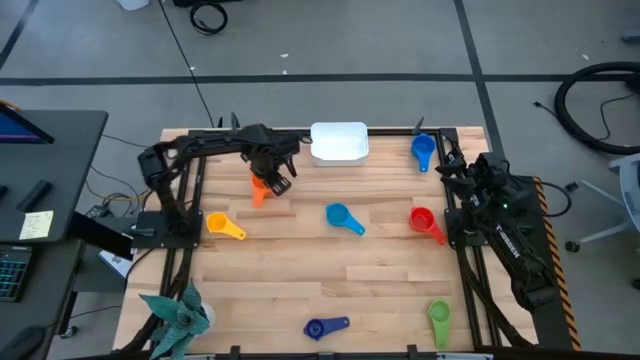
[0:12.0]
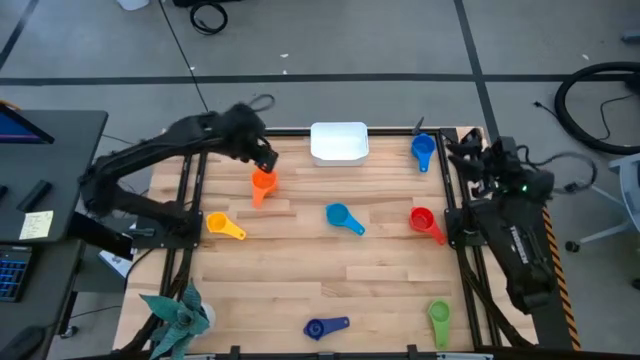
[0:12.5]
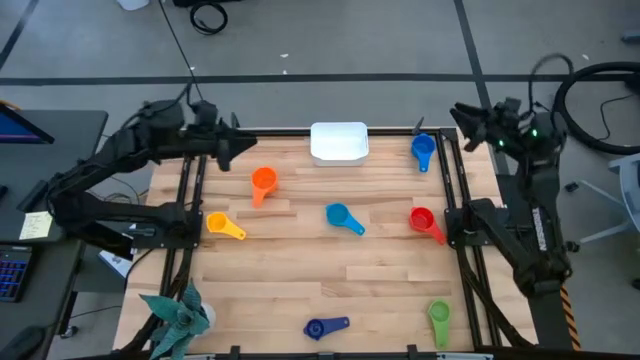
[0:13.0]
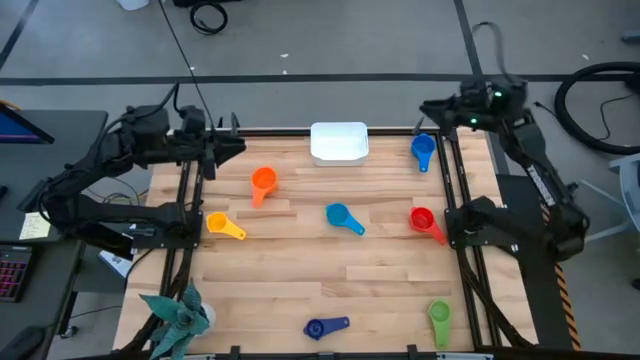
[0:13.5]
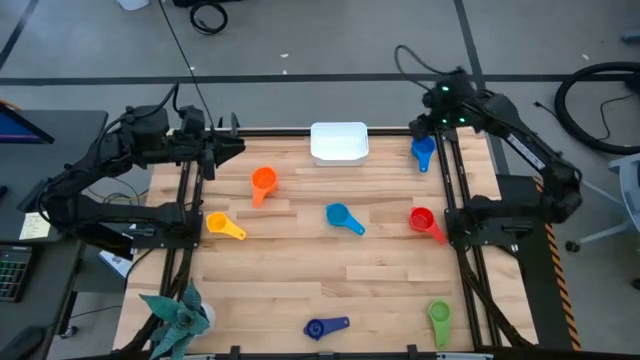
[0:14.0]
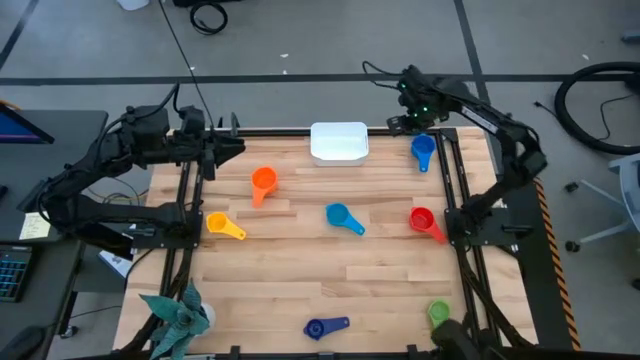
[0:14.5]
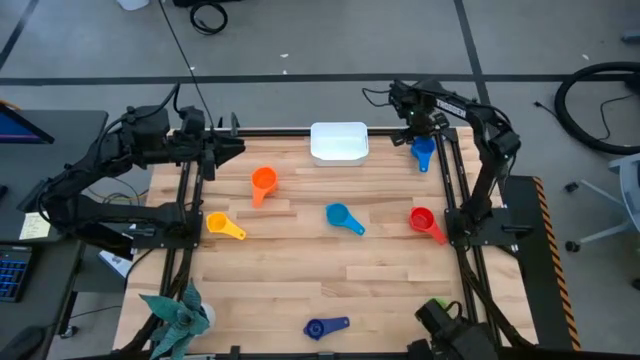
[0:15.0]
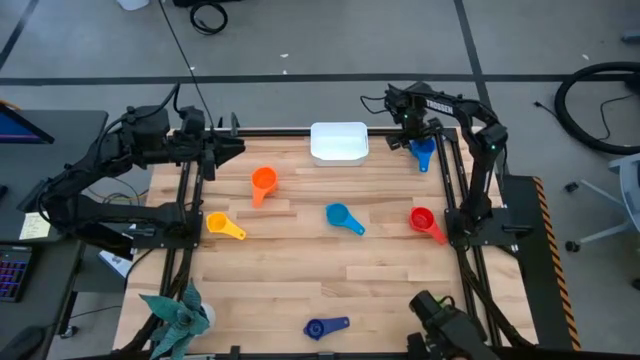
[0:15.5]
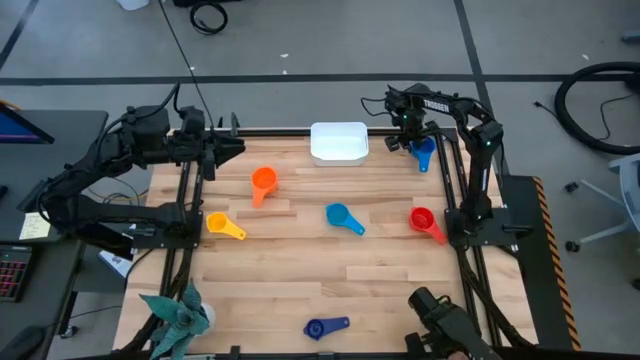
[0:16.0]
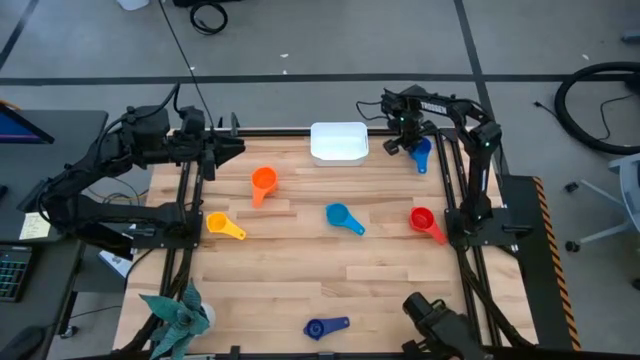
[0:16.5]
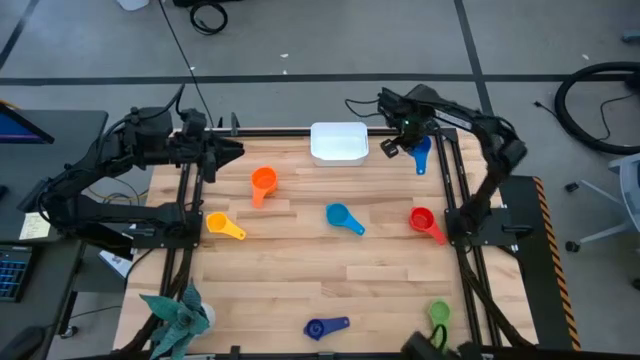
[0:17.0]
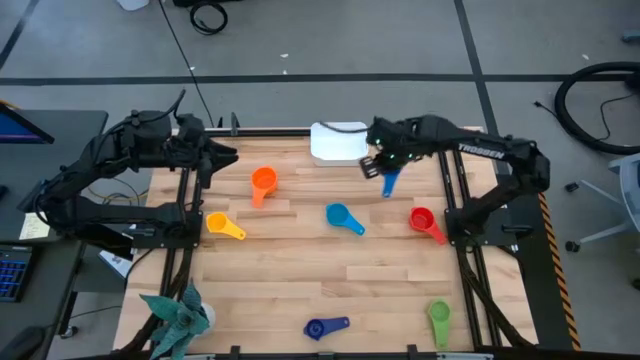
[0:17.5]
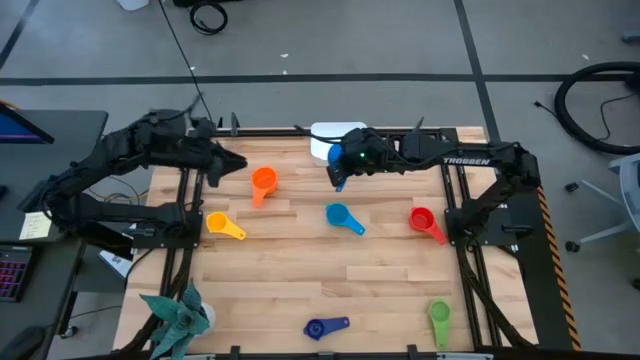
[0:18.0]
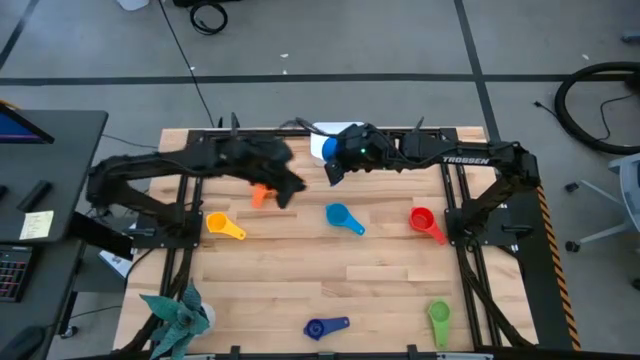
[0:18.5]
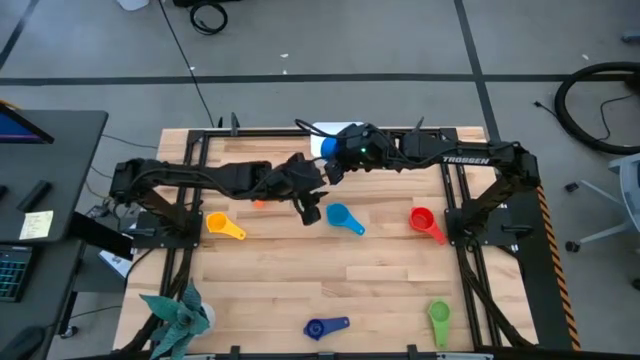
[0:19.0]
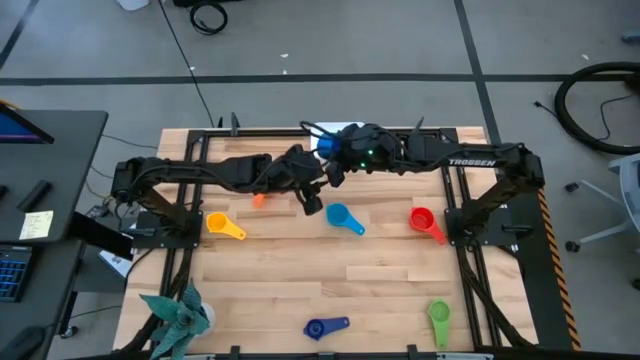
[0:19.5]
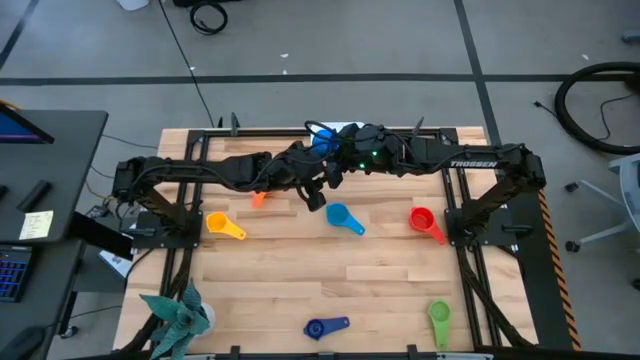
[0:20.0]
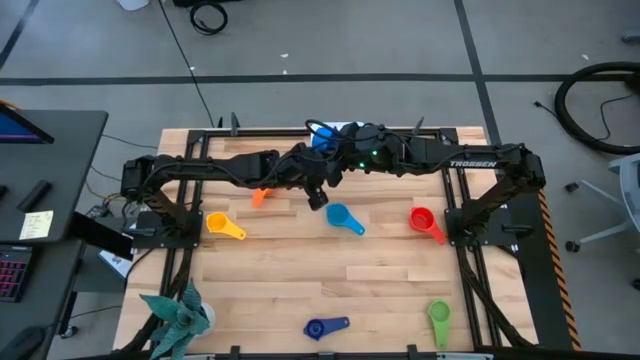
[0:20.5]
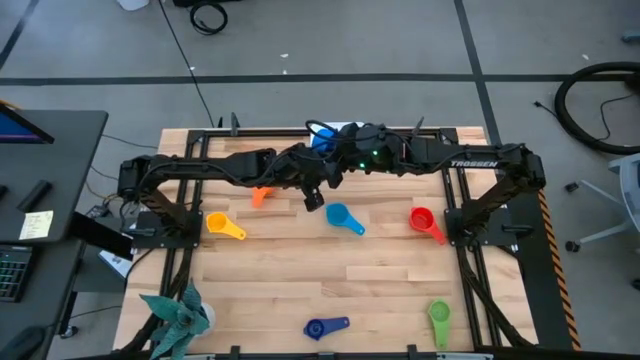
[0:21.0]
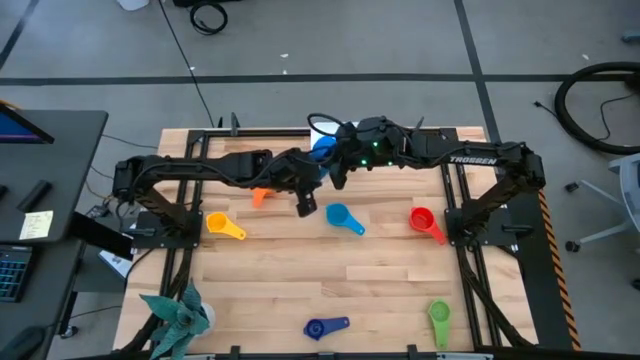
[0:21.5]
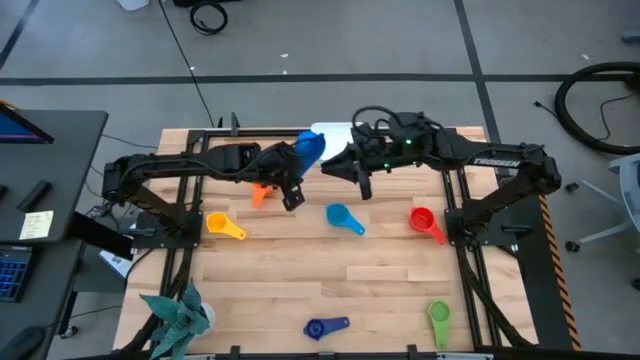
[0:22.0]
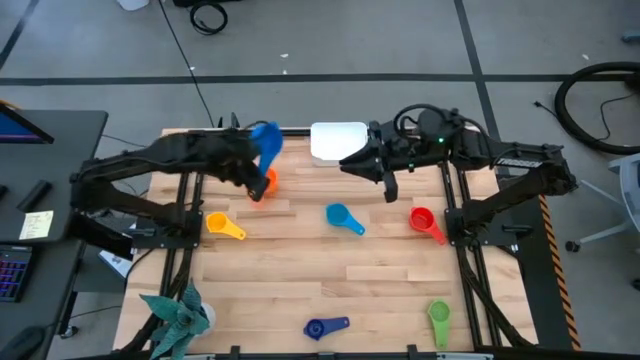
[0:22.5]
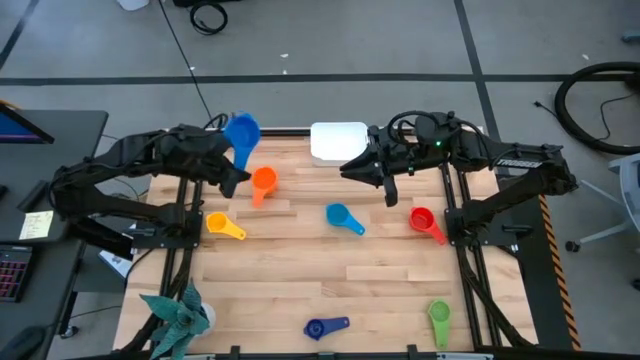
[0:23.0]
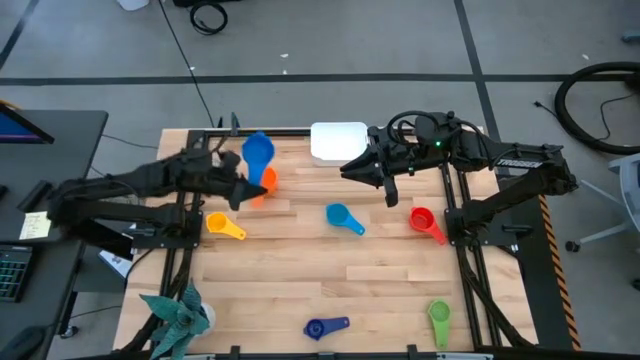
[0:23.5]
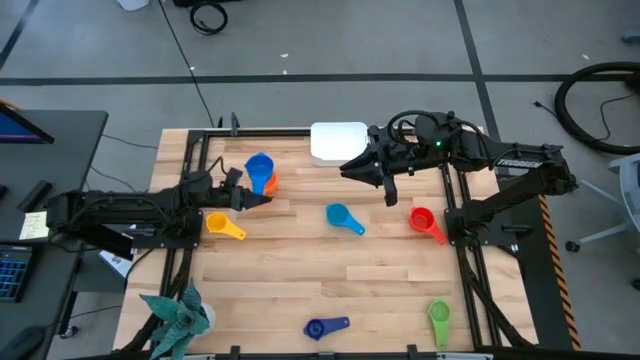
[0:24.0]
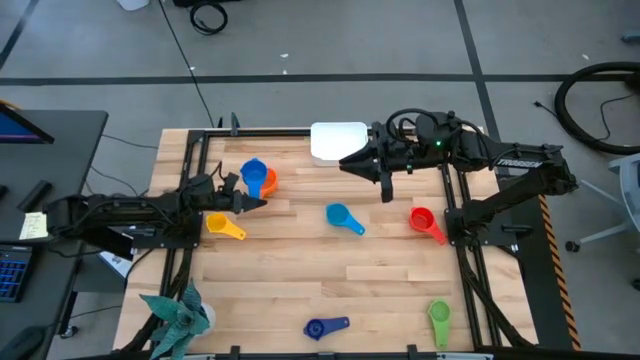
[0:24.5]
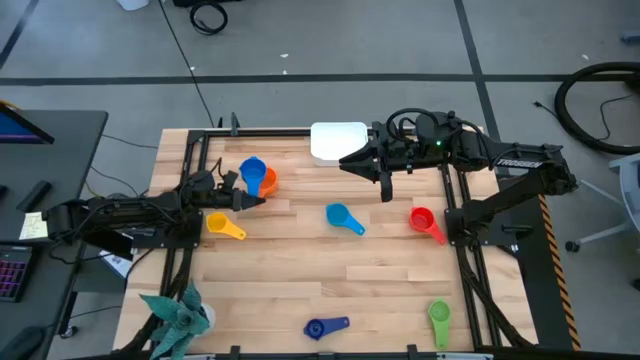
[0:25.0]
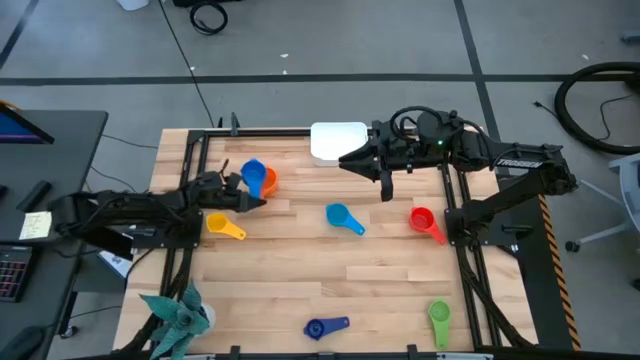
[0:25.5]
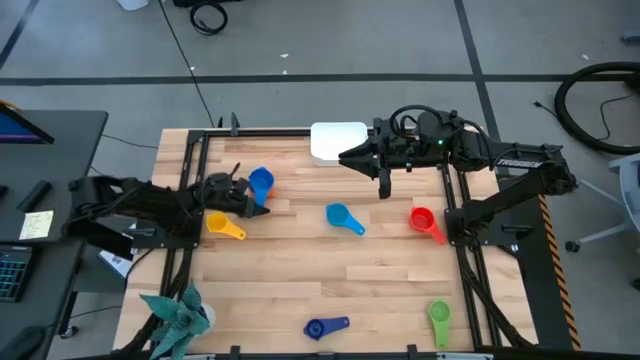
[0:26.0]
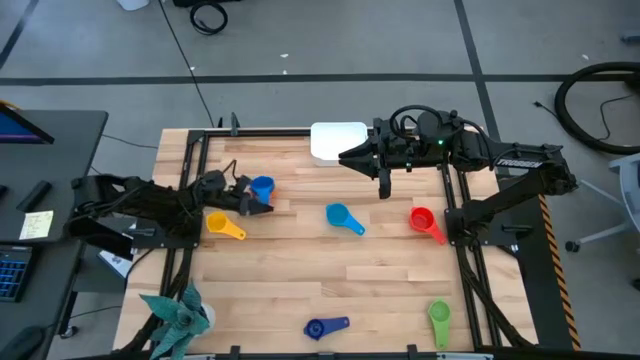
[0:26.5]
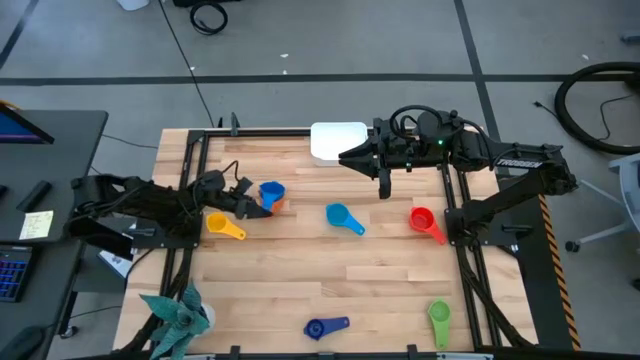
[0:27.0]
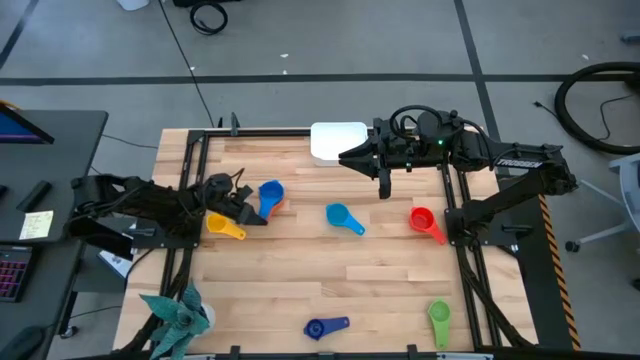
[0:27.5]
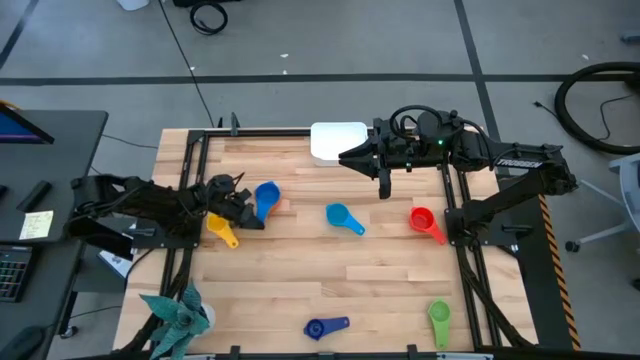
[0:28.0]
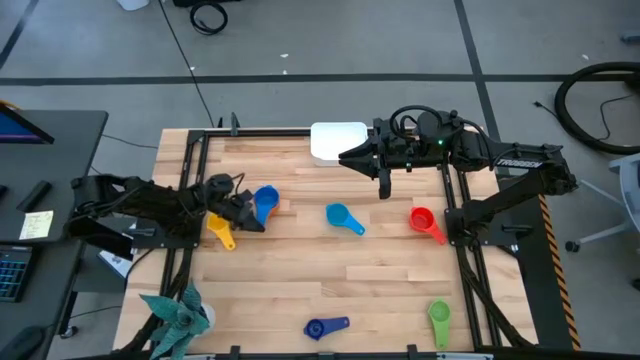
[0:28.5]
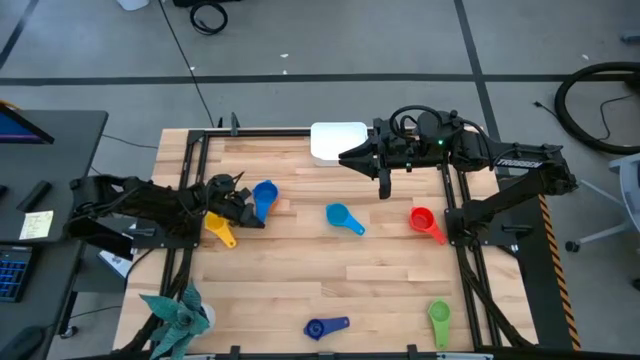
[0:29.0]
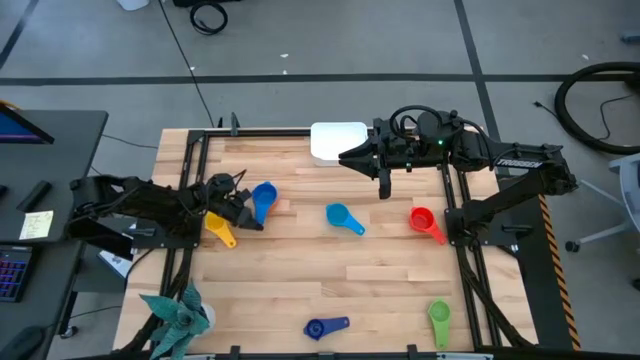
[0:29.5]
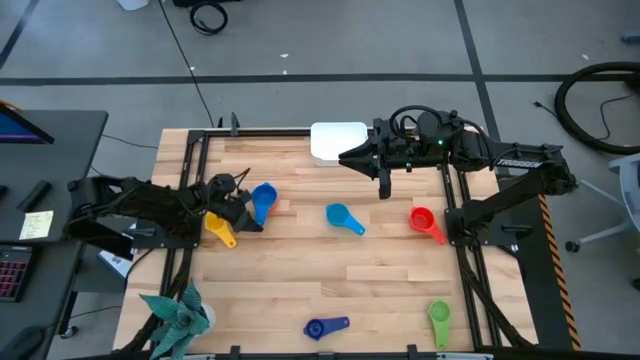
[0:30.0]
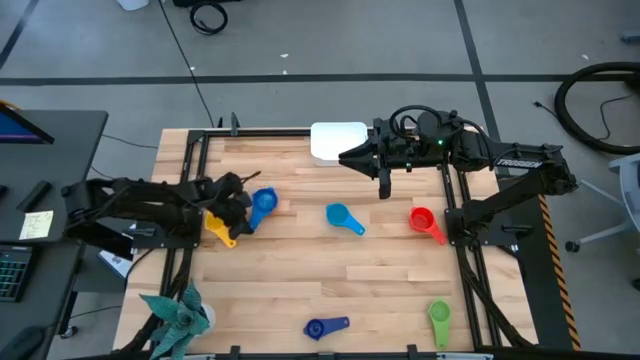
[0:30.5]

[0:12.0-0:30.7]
Task: Nest measuring cups in basket
Stack the blue measuring cup on the orange measuring cup
